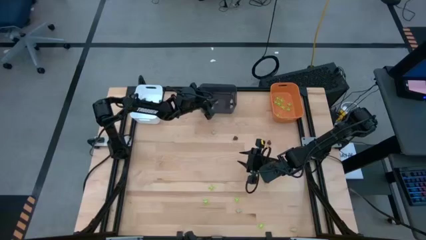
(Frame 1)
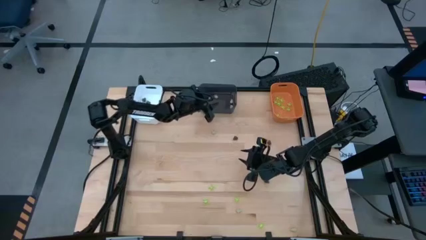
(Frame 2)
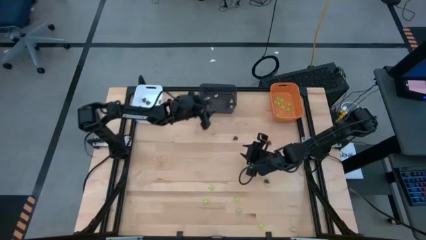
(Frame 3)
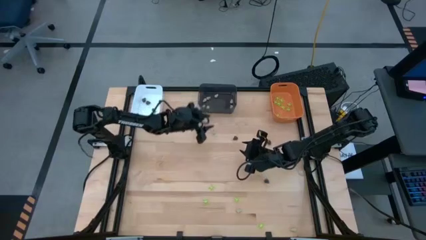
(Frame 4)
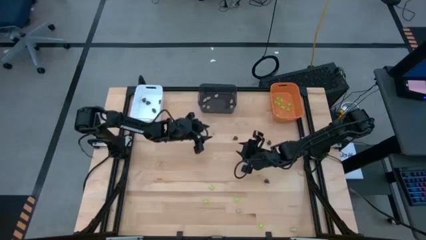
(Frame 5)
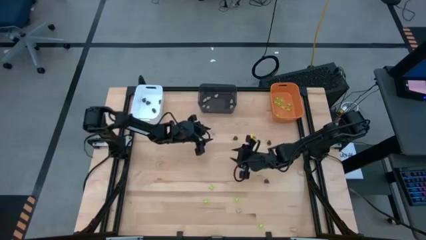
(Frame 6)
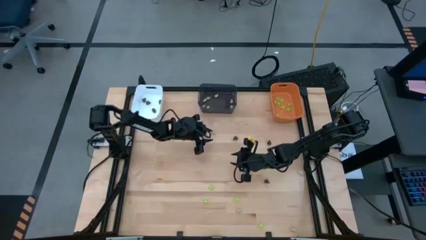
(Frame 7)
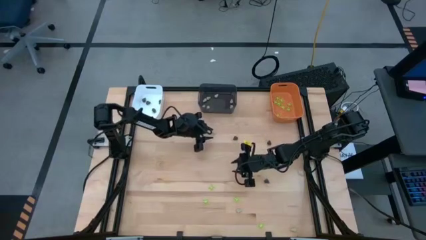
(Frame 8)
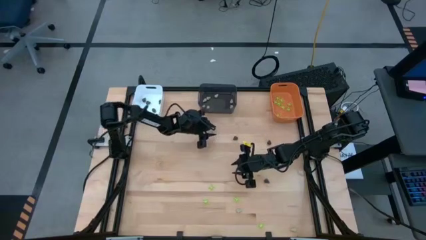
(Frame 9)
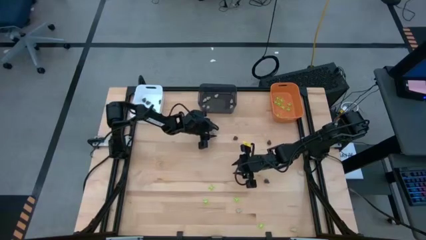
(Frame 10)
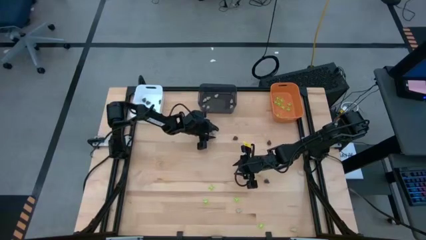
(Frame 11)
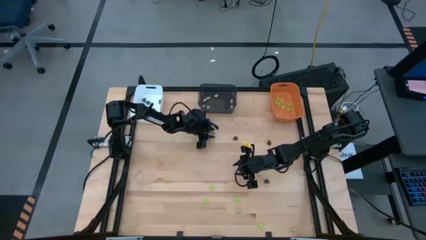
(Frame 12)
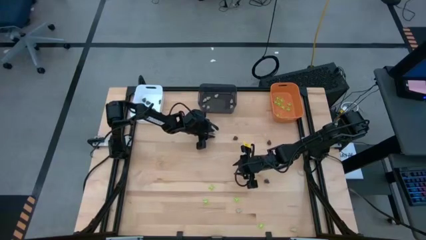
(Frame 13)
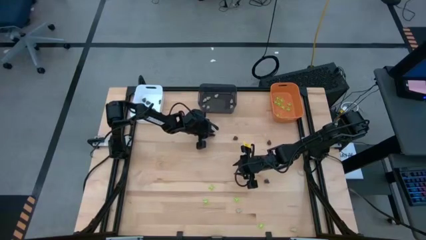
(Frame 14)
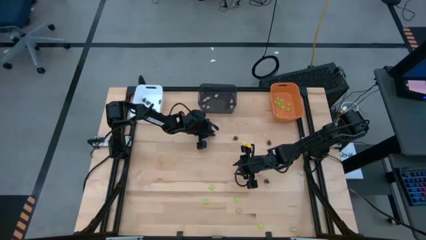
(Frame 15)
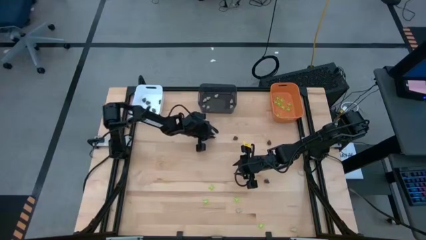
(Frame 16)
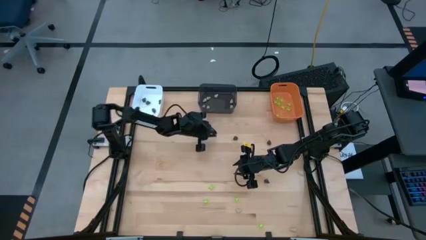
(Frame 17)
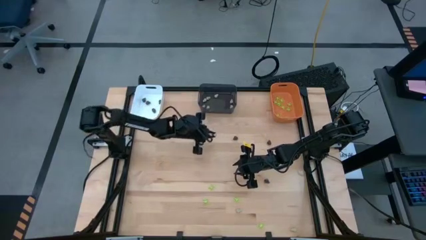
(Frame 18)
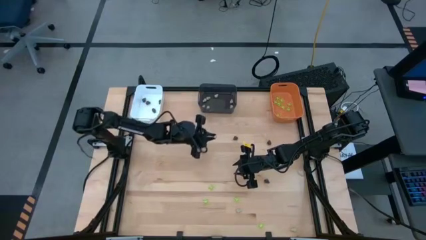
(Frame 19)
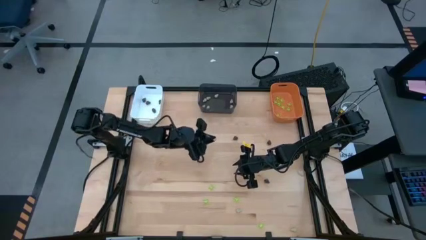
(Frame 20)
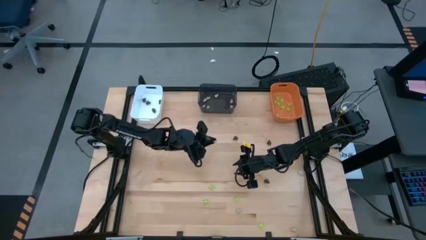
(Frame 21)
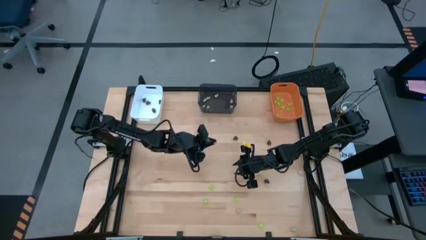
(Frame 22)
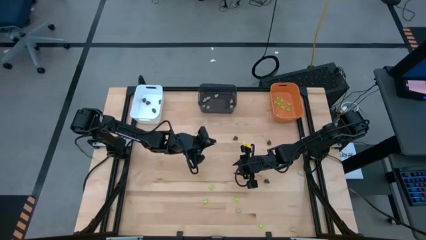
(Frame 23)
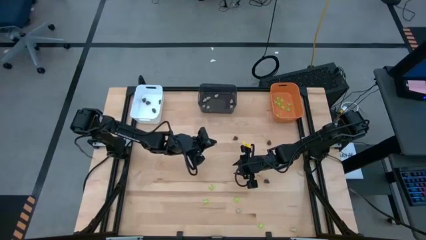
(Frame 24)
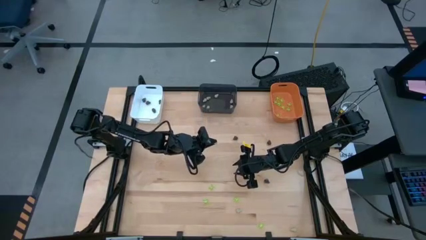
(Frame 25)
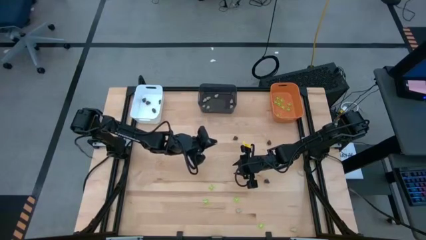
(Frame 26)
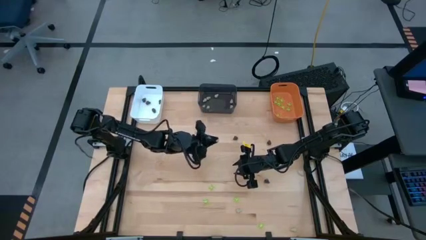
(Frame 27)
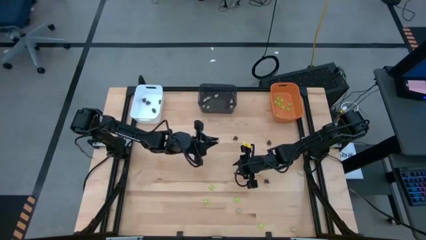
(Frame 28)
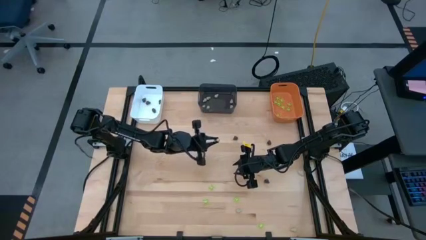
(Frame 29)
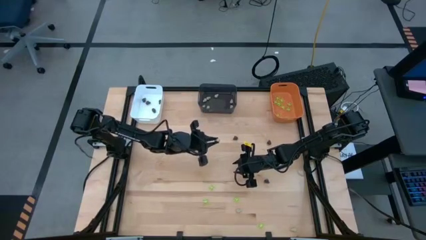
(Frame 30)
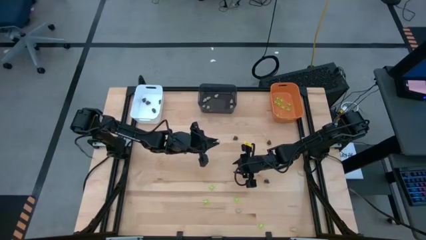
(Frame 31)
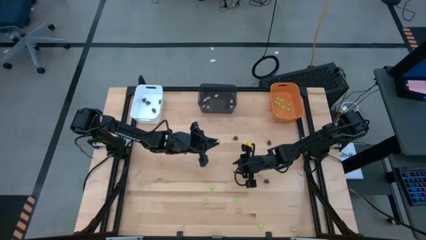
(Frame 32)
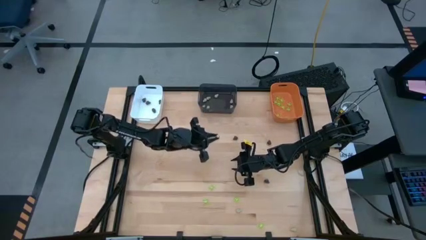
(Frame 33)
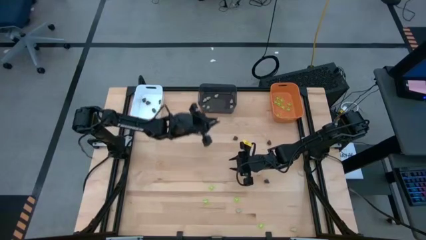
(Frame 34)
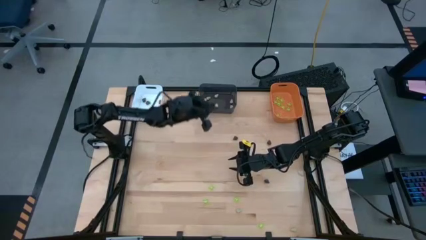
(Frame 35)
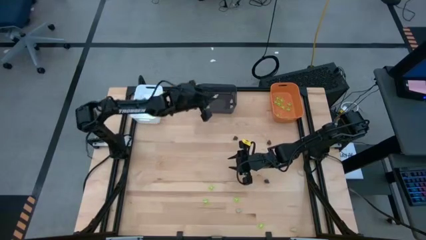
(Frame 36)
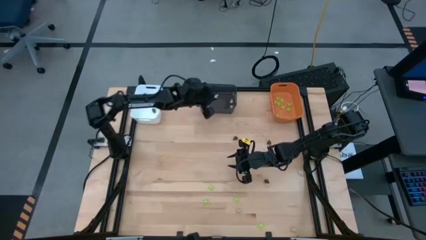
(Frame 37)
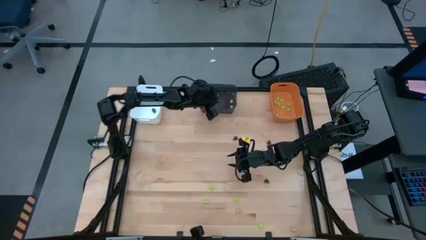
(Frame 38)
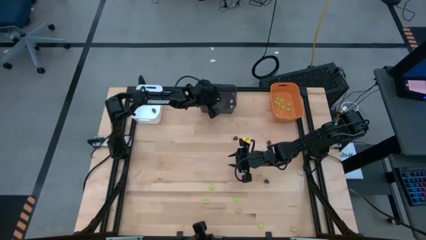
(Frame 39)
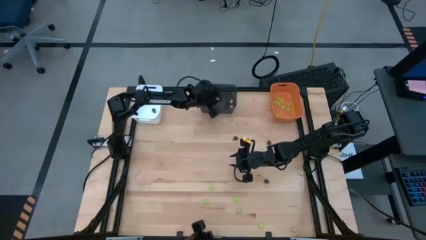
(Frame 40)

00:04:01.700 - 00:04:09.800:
Task: Sort Halloween decoration
Put the white toy skull into the black bin

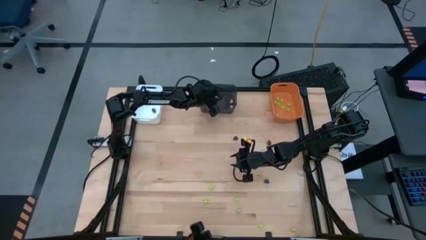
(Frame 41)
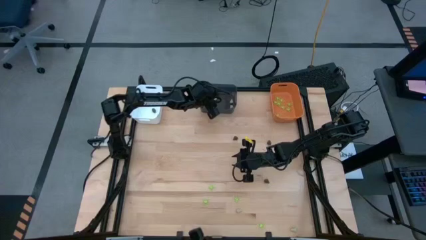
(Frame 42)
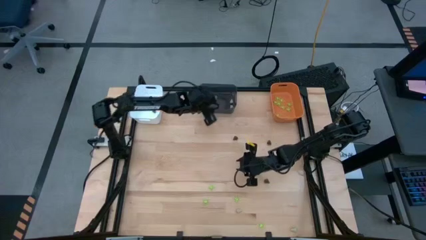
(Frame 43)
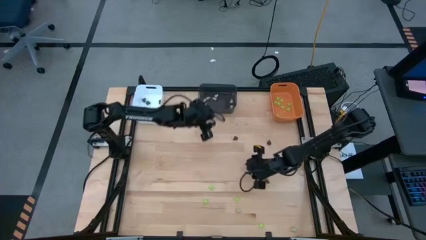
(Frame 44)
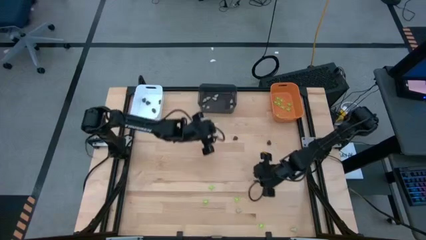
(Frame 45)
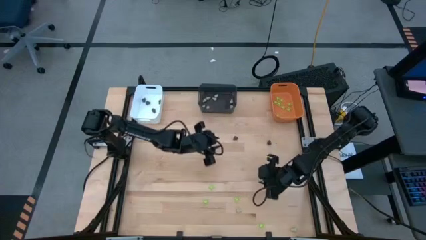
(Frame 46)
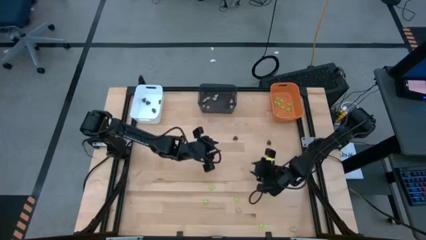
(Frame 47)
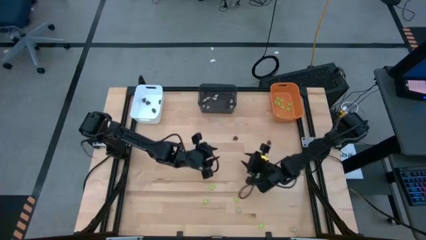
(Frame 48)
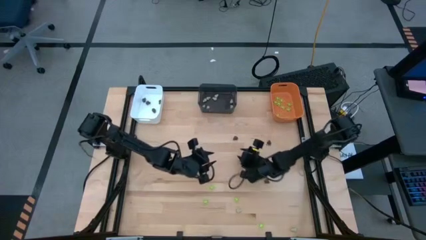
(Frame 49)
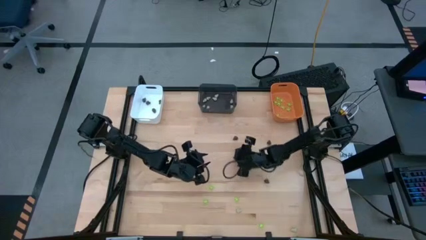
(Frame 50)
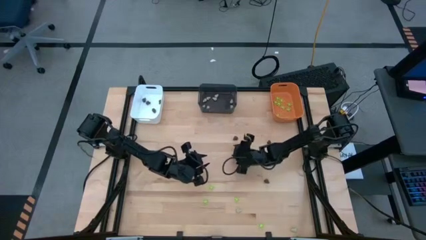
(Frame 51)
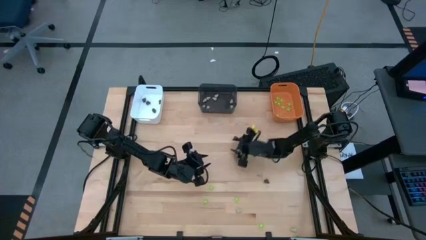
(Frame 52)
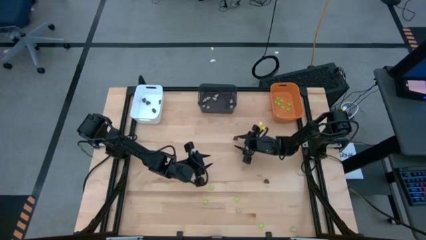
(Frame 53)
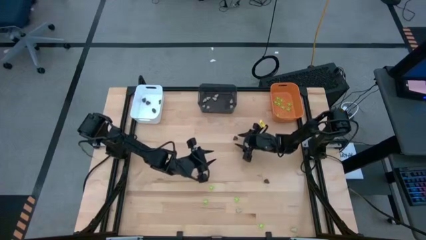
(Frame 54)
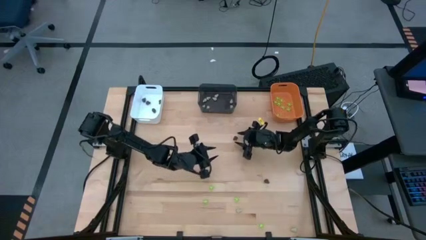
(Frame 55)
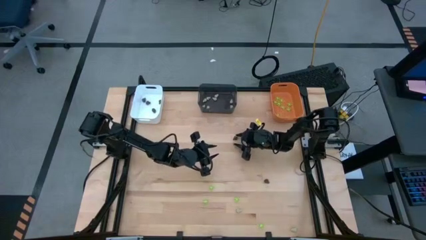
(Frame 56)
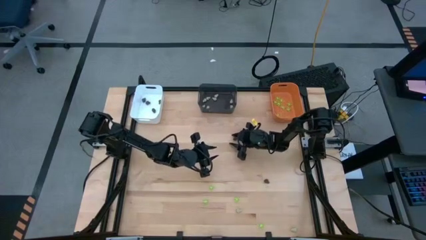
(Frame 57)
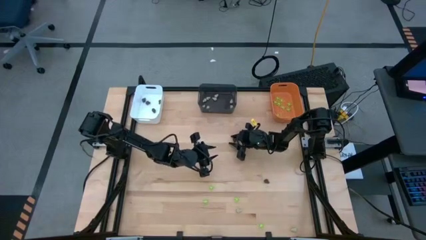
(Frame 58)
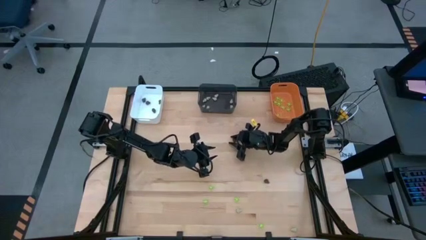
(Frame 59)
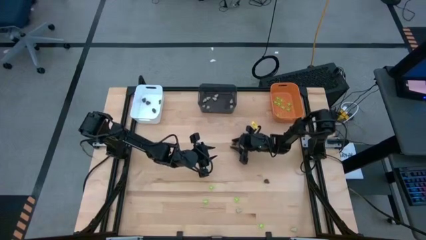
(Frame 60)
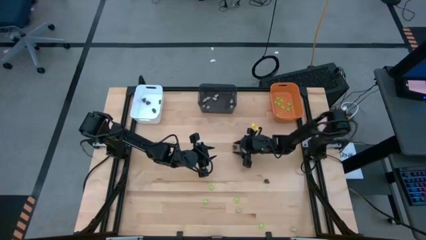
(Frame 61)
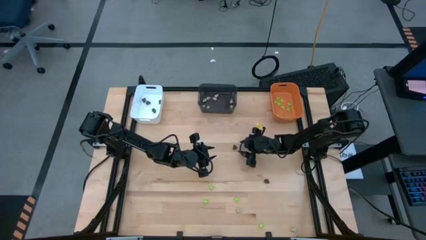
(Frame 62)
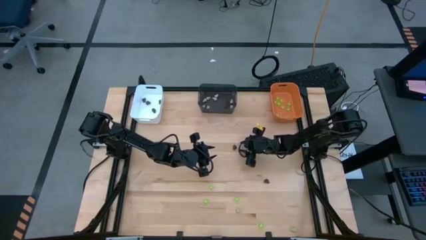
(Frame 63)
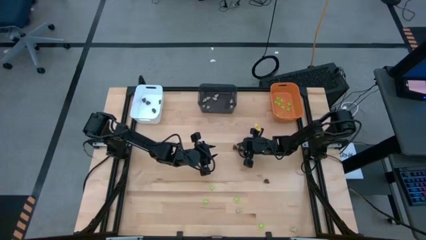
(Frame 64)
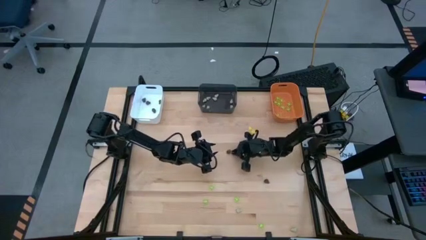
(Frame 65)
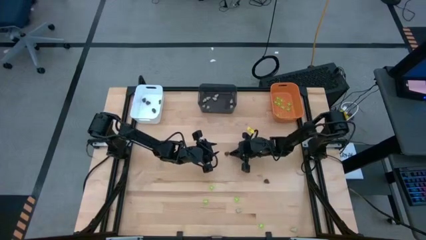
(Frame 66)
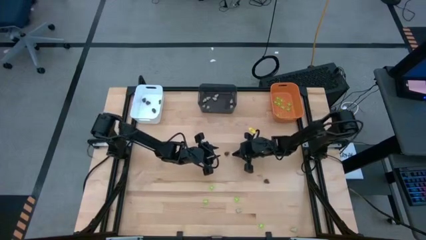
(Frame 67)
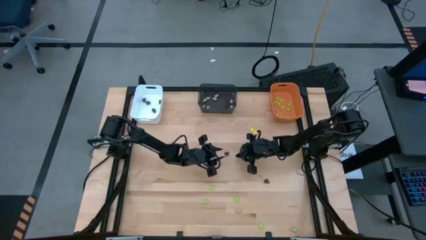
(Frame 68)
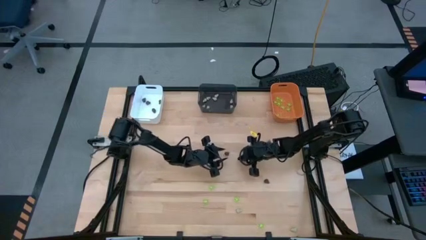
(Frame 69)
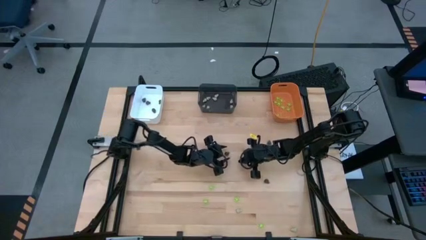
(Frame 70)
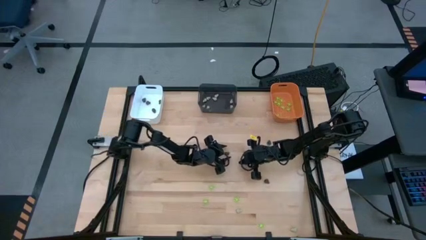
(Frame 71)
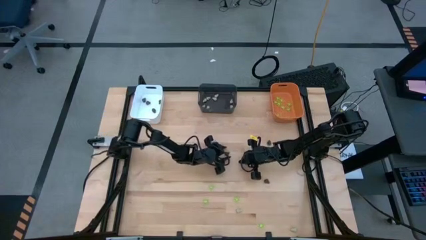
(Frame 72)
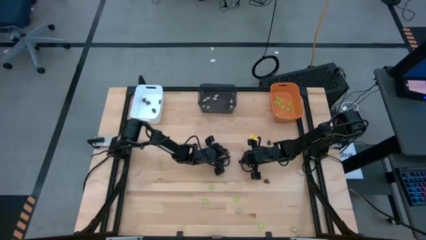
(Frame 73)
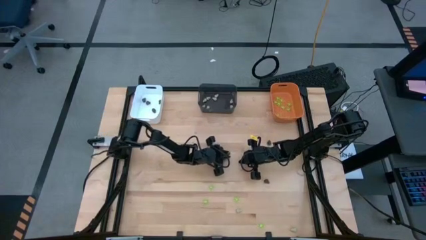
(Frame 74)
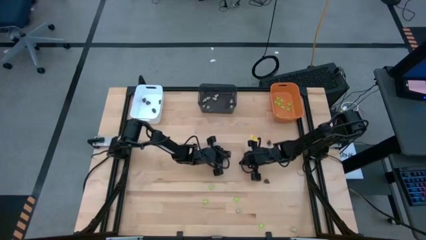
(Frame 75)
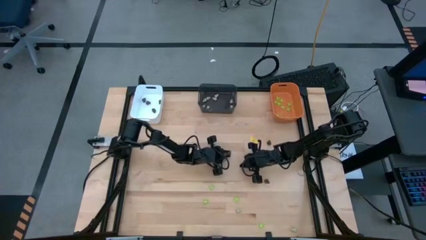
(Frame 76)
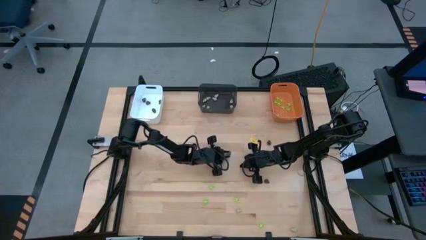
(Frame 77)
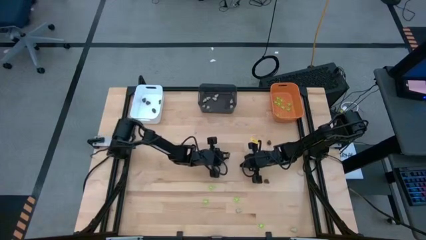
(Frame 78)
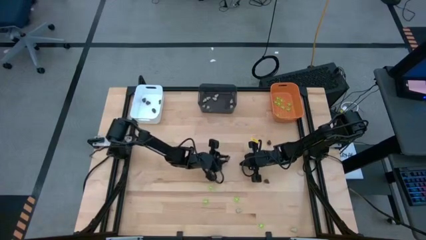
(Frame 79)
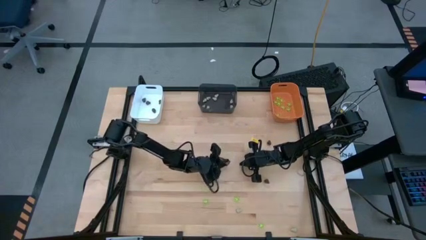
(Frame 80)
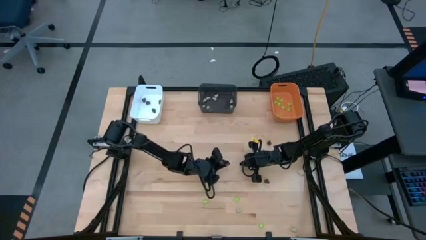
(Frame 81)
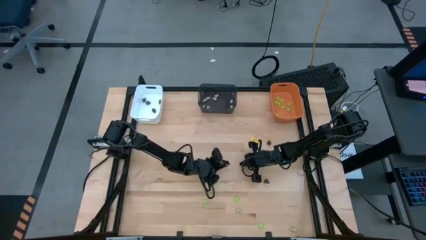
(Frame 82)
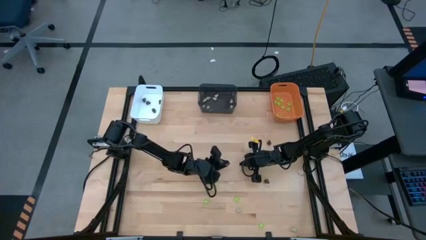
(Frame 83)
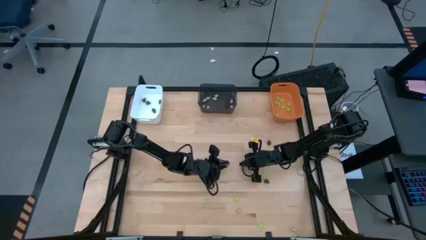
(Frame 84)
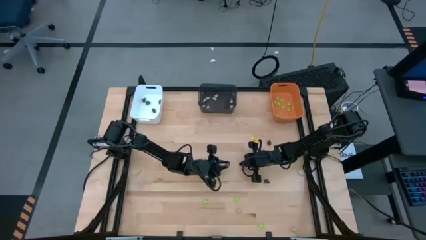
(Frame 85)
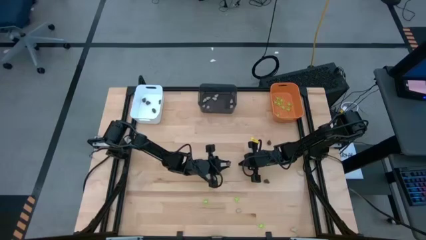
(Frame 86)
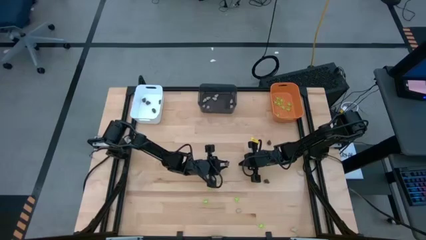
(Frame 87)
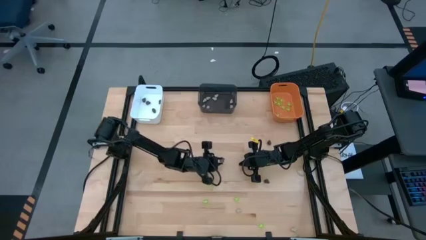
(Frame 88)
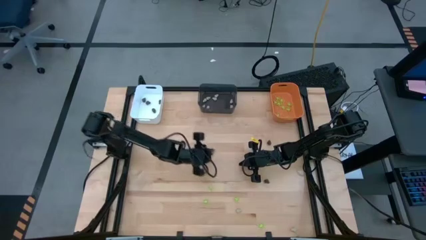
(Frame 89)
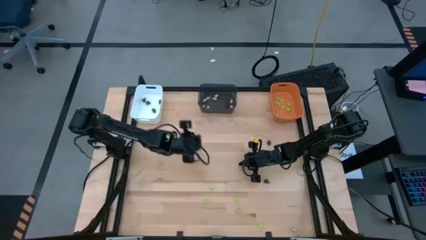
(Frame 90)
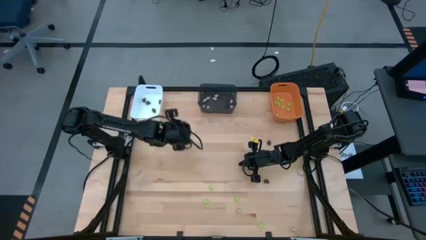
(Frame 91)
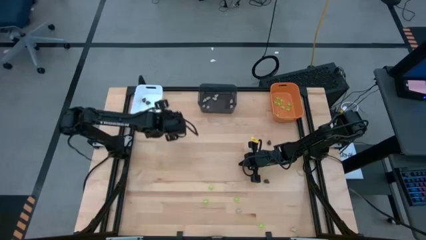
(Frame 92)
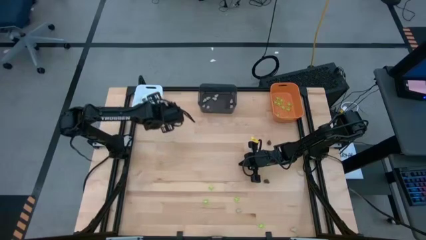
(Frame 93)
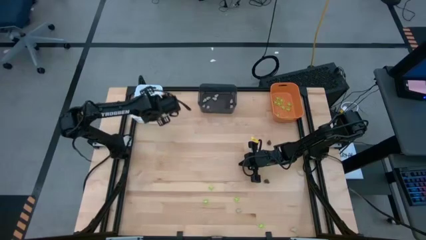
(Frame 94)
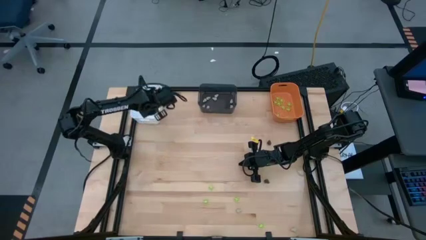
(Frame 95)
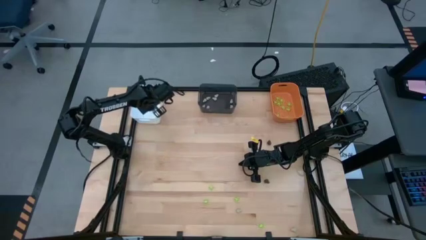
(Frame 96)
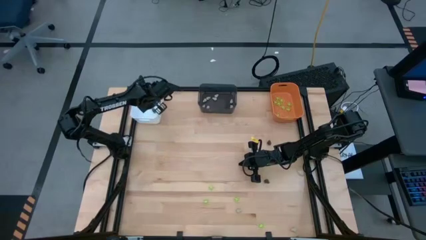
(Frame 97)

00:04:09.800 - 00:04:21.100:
Put the black toy skull into the white bin
